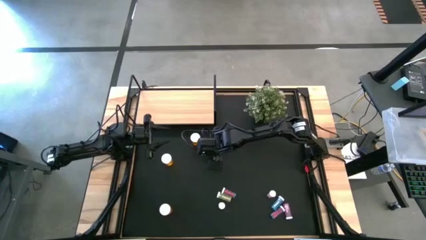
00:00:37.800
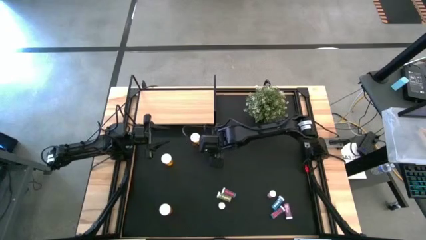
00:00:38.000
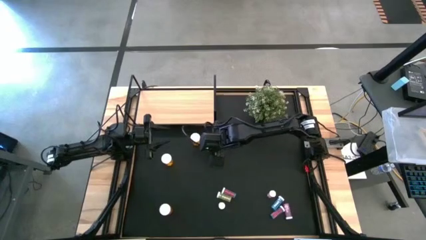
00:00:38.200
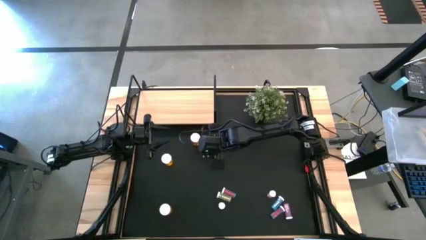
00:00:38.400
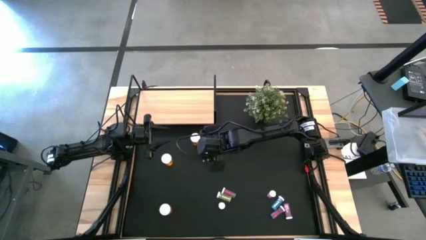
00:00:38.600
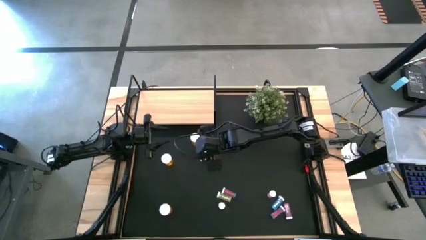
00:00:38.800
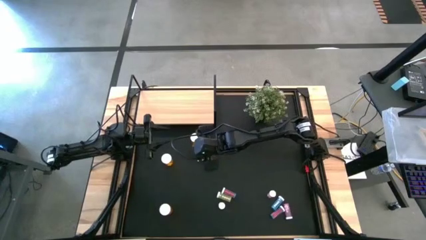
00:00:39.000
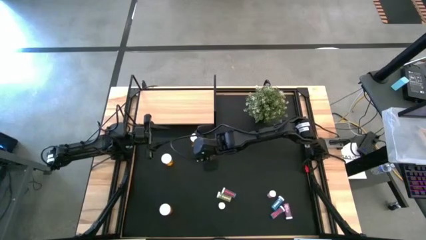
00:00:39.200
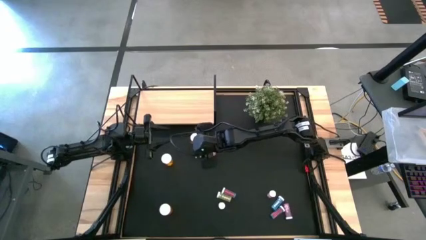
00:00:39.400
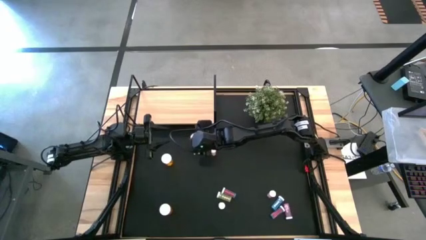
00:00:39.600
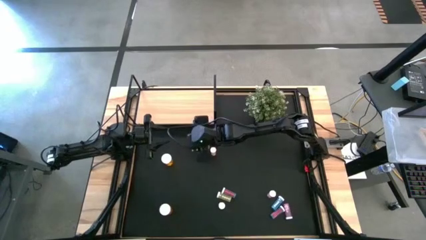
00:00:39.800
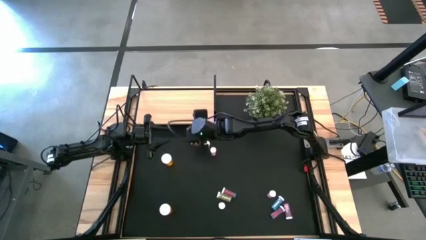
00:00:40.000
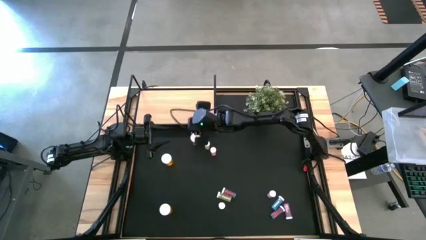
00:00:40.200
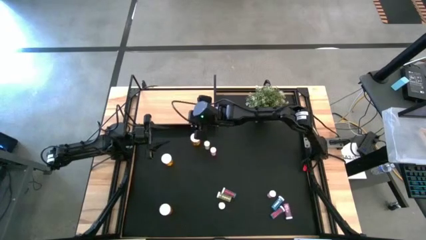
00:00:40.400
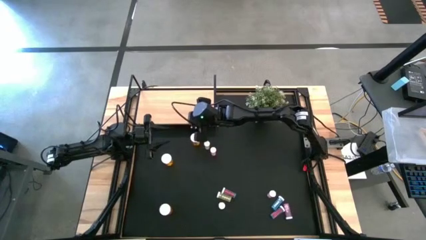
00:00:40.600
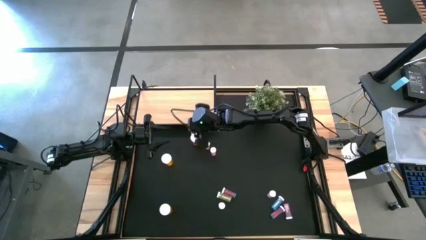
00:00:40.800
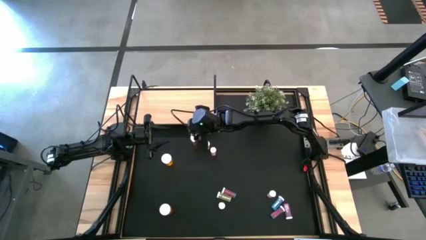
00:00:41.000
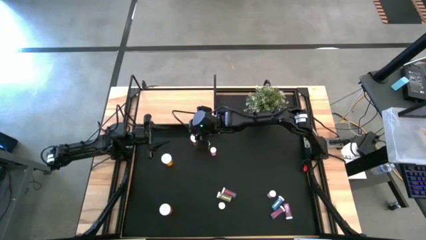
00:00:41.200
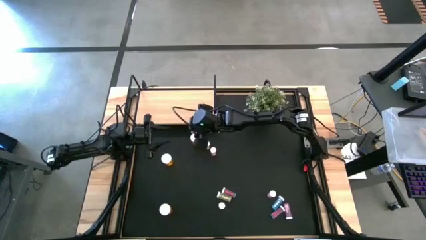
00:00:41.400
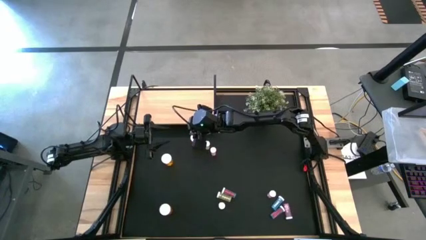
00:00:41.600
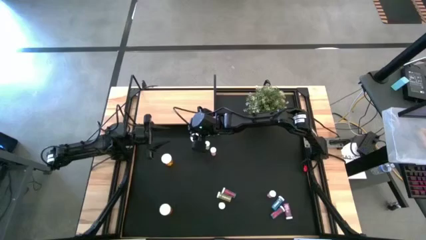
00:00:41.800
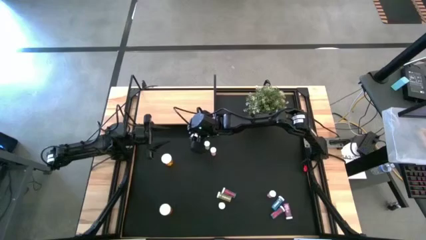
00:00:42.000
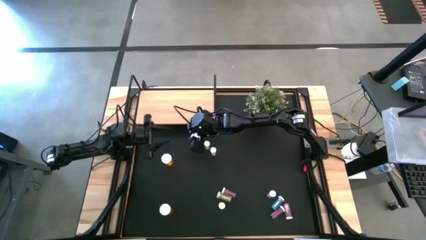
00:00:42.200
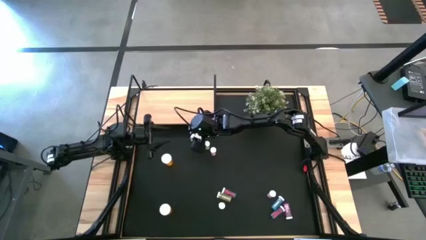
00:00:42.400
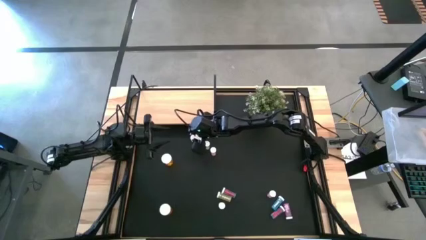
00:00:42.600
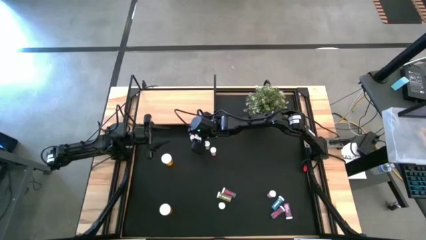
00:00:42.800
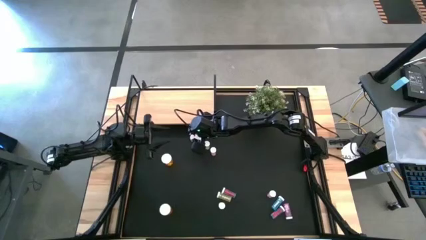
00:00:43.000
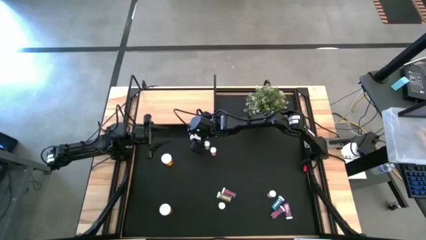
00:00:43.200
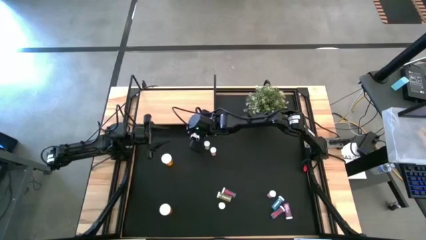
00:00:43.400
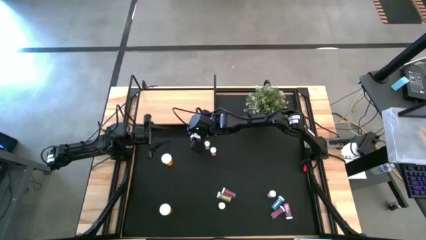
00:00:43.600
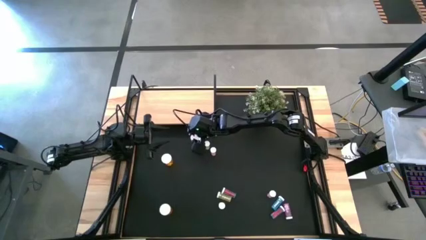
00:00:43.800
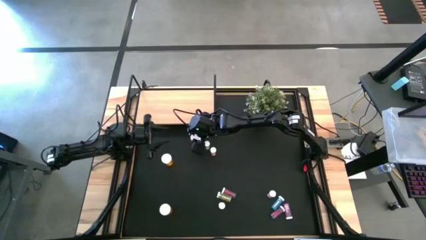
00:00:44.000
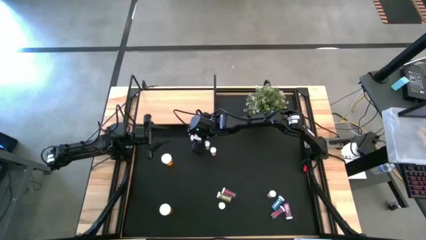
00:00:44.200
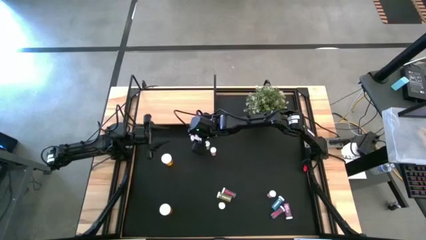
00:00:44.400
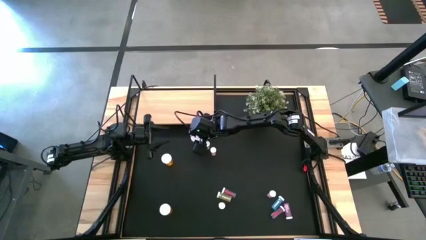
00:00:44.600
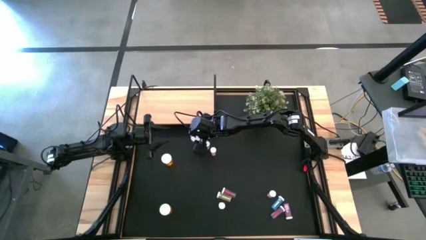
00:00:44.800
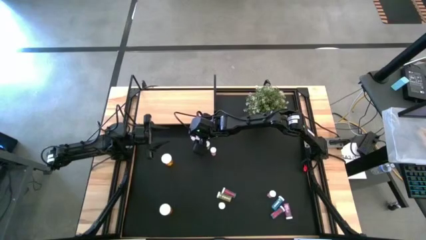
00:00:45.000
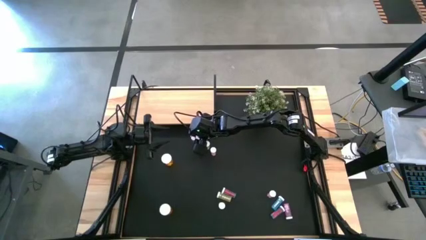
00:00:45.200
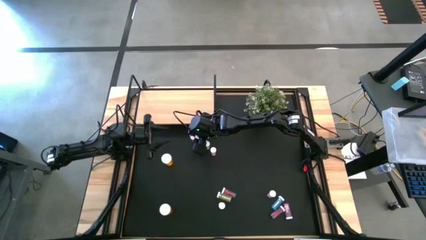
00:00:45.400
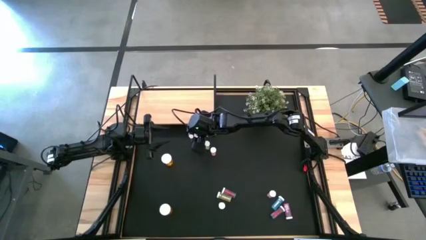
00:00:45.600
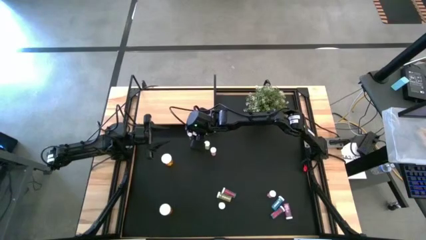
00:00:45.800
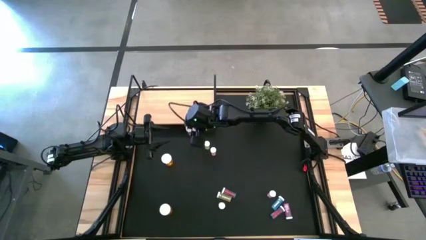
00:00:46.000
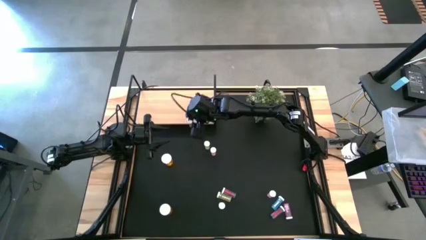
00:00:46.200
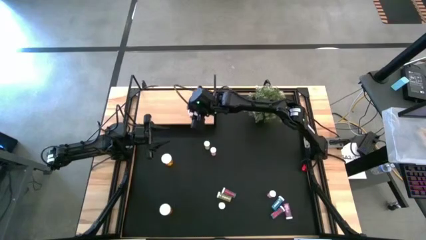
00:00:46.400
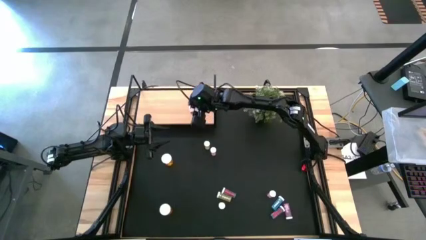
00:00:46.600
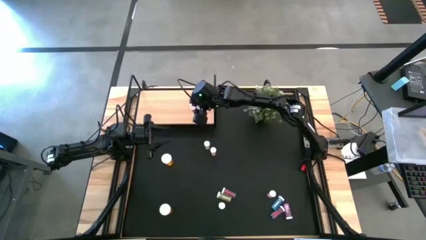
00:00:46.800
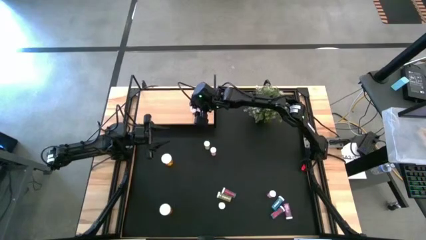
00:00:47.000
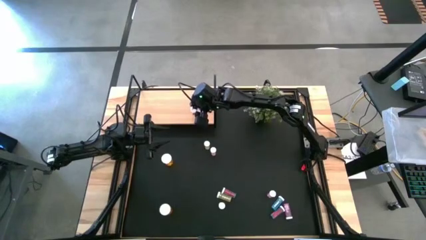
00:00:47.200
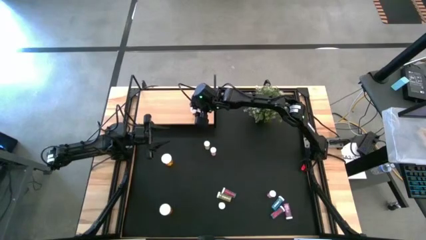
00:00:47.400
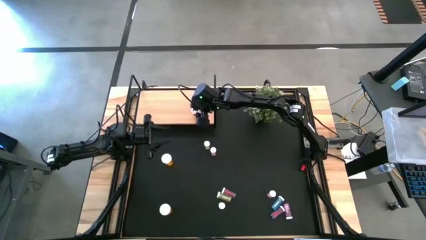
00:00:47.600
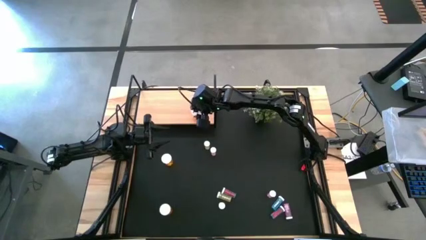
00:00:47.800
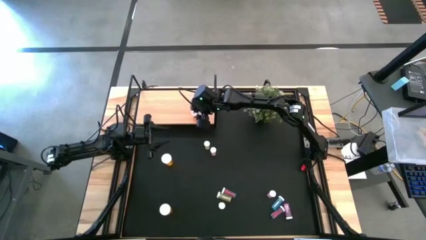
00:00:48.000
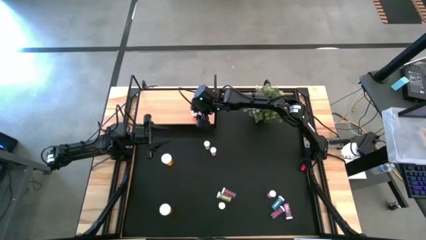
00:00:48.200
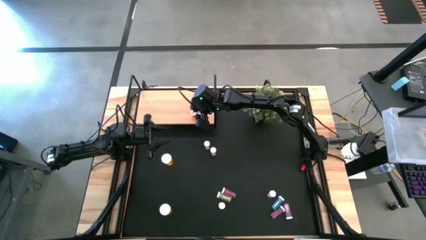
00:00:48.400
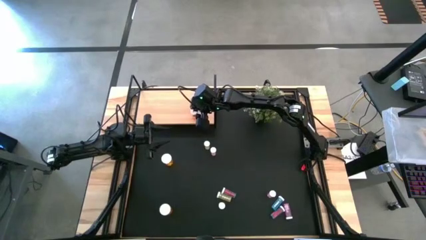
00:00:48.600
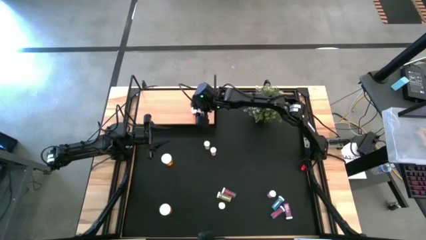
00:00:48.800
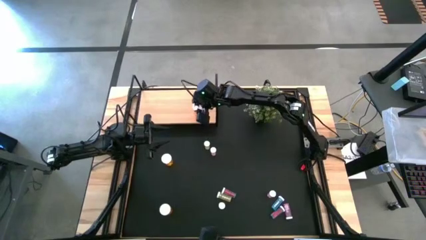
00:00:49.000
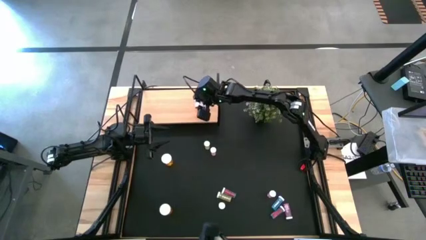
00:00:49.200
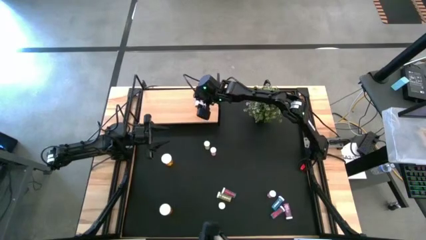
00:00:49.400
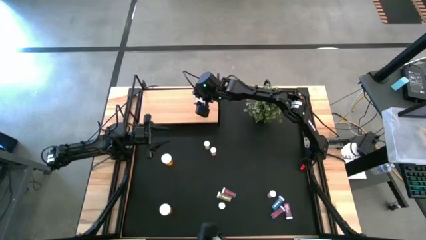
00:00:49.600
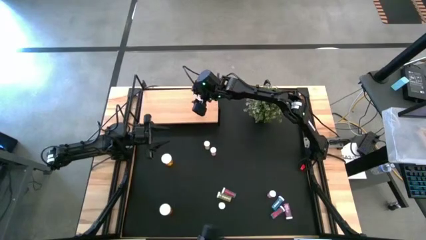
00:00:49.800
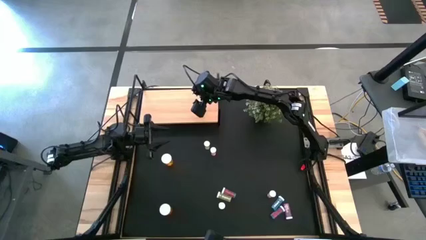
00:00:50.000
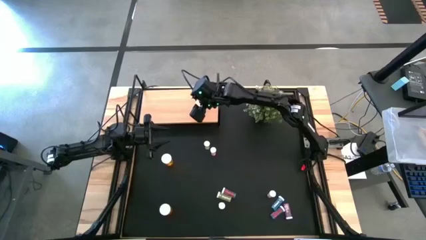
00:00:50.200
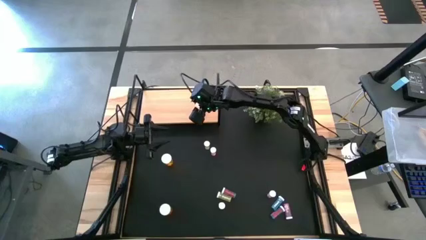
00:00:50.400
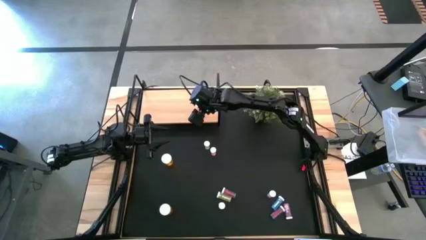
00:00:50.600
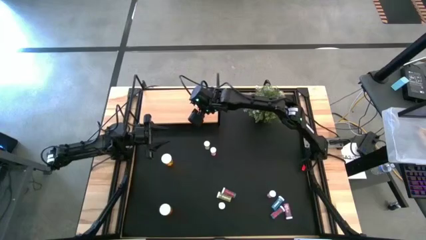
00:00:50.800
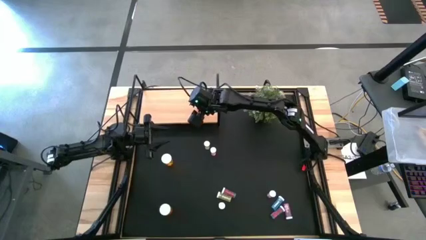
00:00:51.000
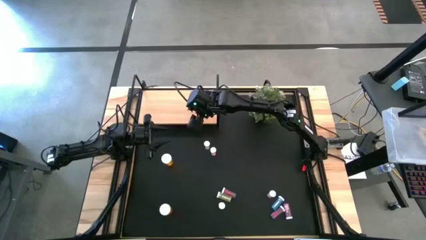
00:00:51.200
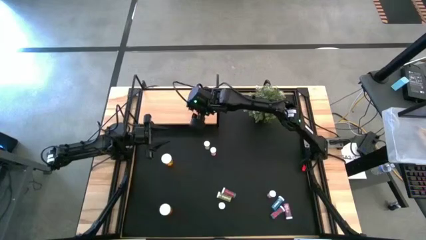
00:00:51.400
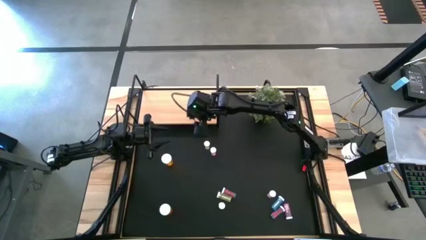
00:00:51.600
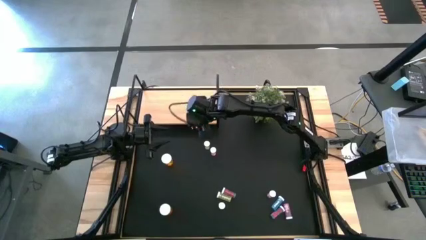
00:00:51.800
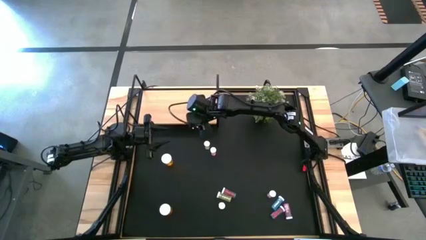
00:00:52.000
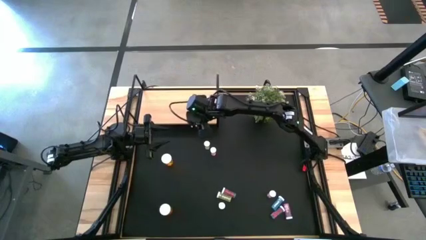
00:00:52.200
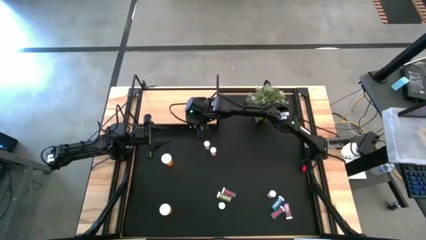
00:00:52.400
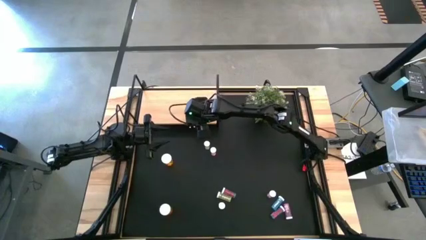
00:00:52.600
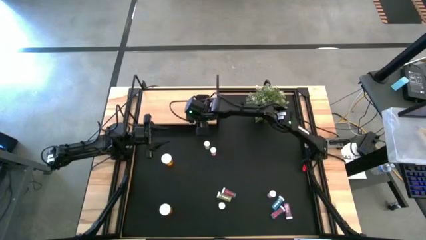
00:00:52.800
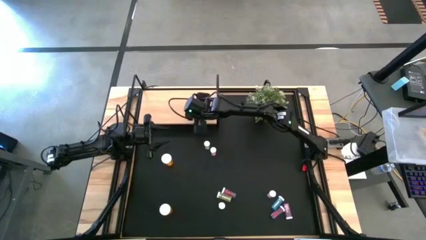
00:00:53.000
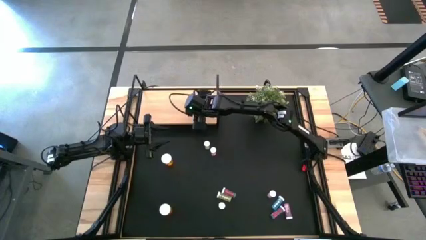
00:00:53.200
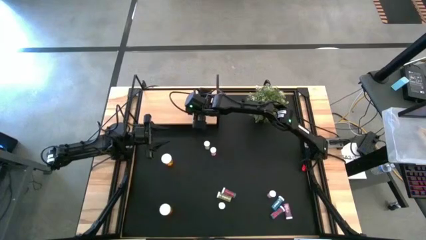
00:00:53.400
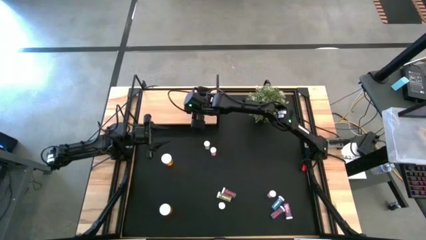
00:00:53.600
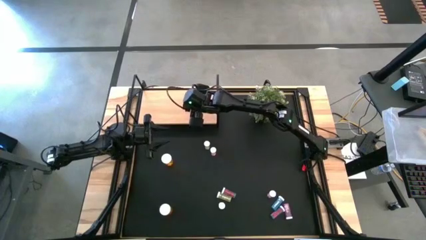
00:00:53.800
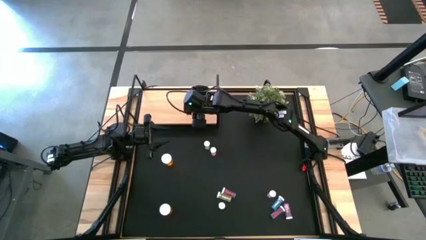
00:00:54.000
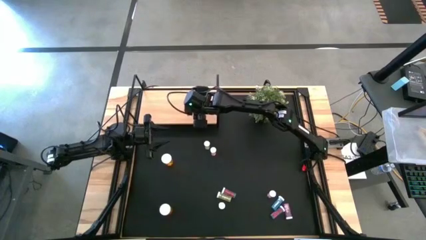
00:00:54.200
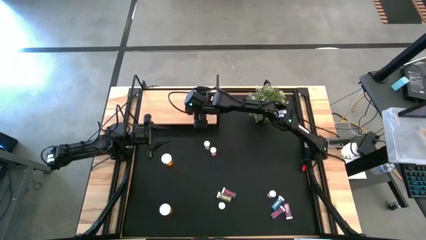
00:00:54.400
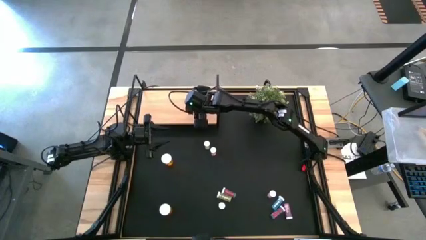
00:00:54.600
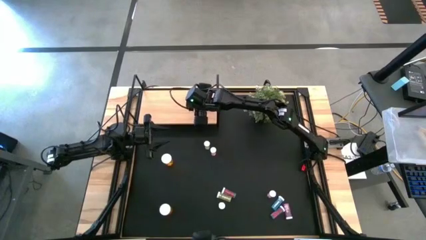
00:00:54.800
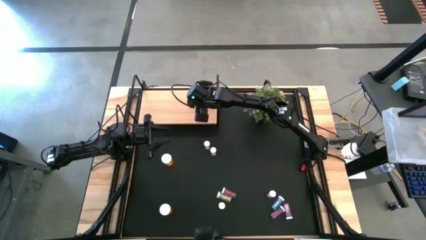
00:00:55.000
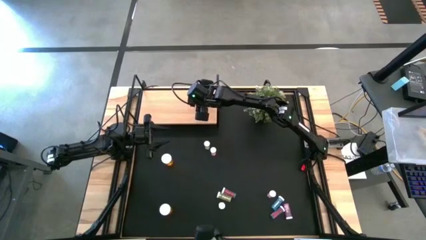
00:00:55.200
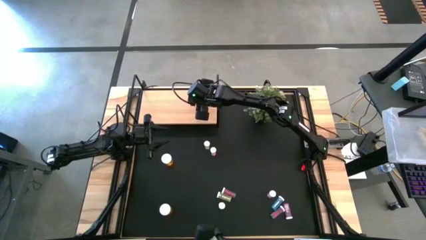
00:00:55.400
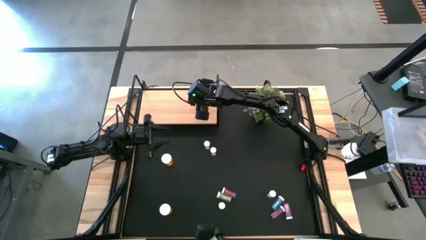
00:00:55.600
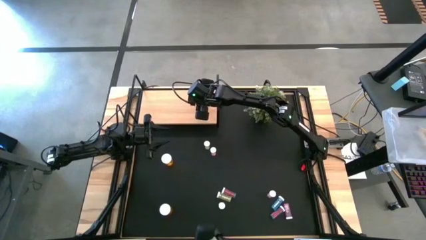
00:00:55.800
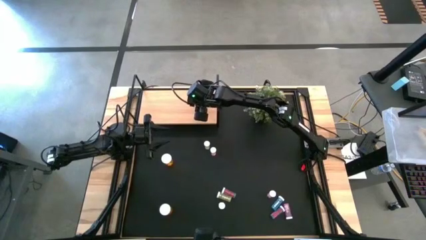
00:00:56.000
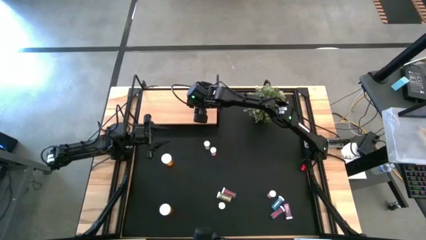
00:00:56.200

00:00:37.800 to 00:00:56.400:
Task: Pick and place medicine bottles onto shelf by color
Put the top orange medicine bottle on the shelf
